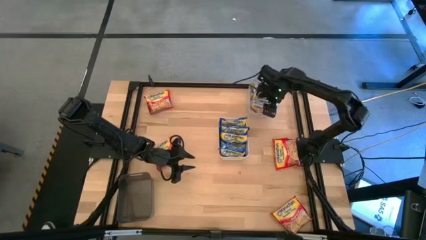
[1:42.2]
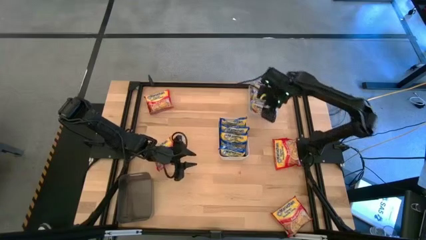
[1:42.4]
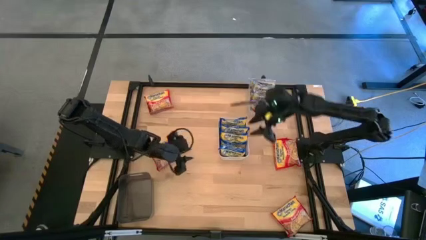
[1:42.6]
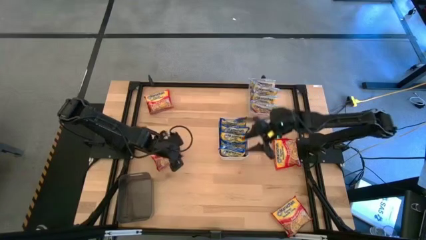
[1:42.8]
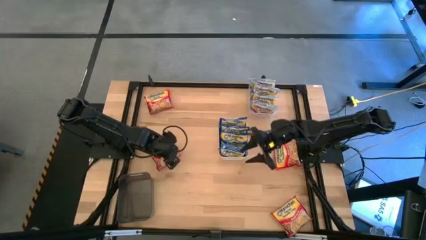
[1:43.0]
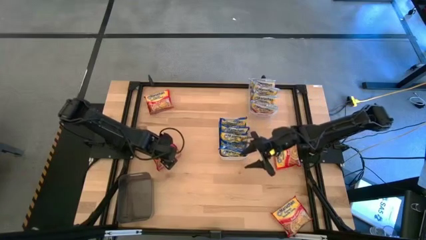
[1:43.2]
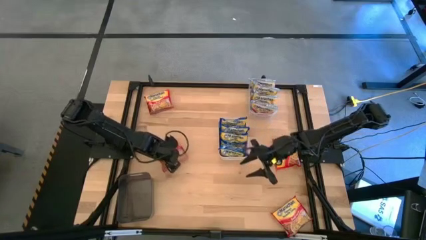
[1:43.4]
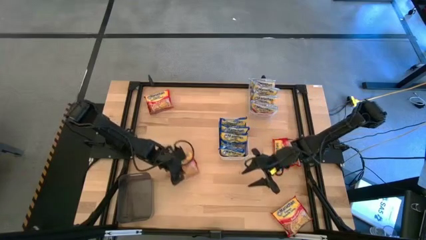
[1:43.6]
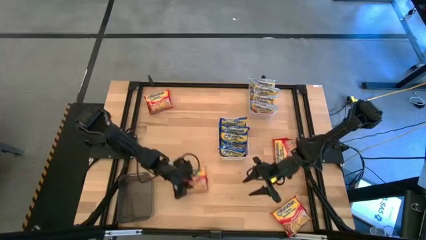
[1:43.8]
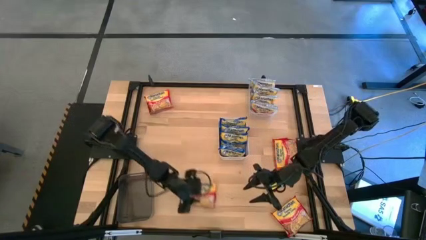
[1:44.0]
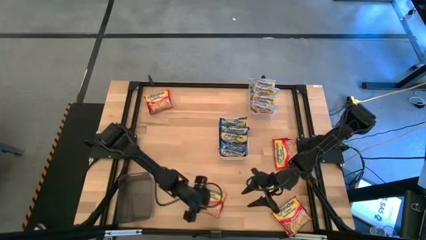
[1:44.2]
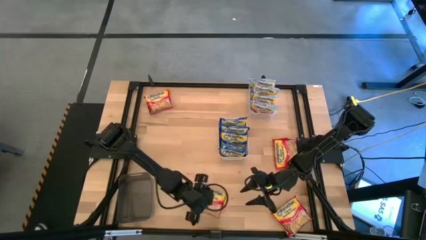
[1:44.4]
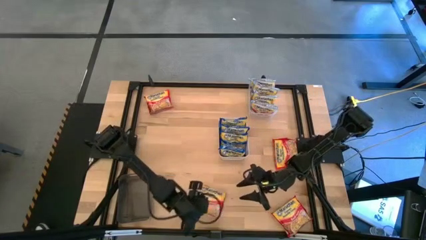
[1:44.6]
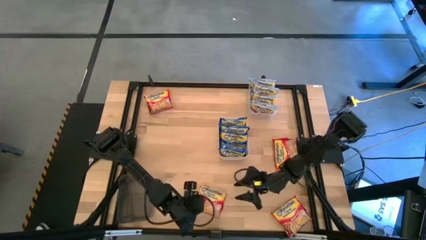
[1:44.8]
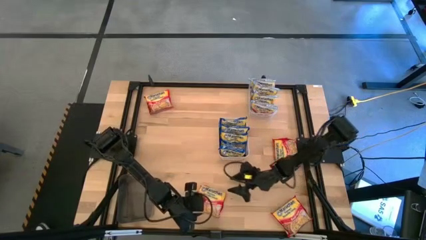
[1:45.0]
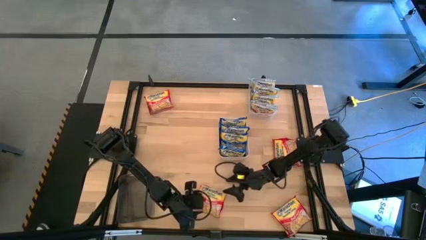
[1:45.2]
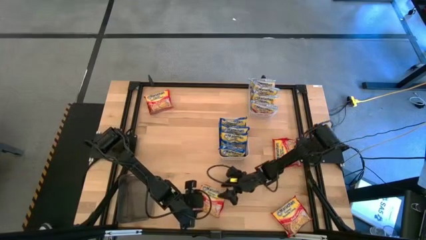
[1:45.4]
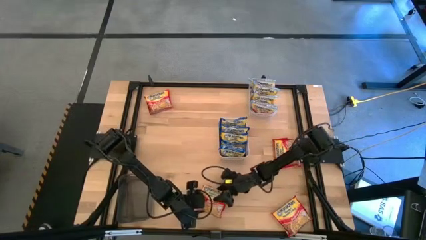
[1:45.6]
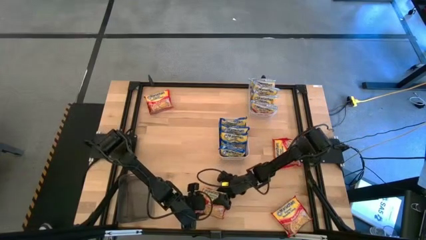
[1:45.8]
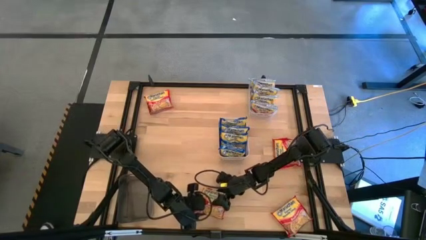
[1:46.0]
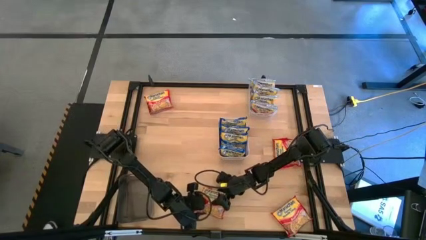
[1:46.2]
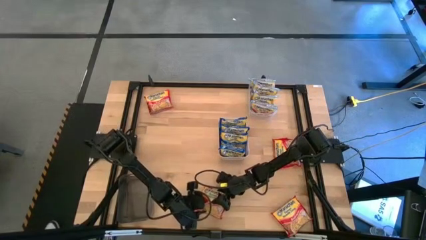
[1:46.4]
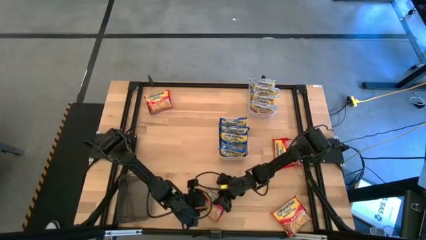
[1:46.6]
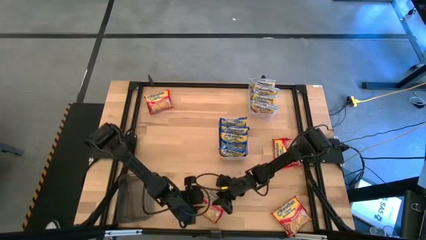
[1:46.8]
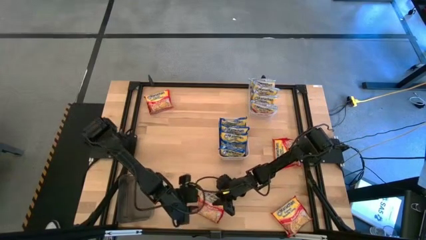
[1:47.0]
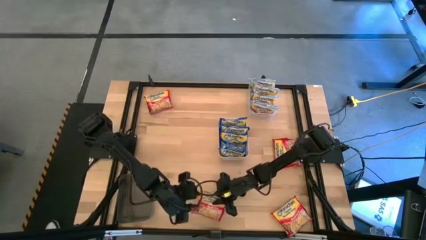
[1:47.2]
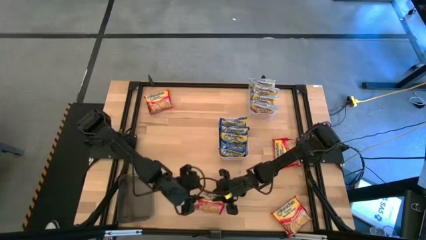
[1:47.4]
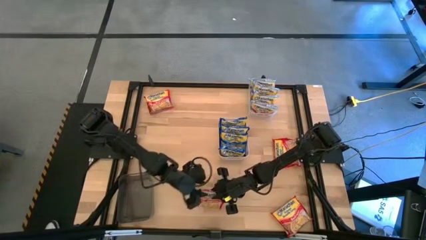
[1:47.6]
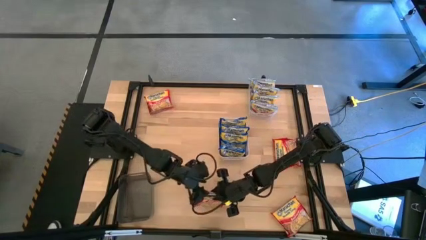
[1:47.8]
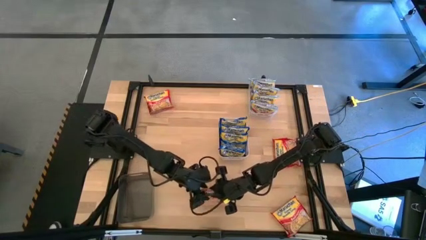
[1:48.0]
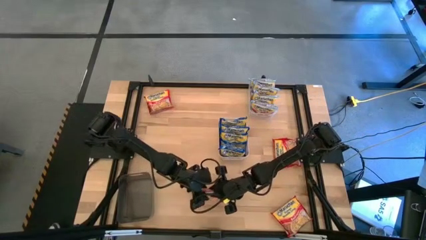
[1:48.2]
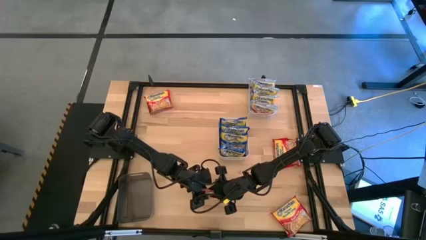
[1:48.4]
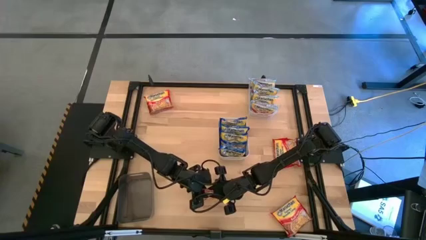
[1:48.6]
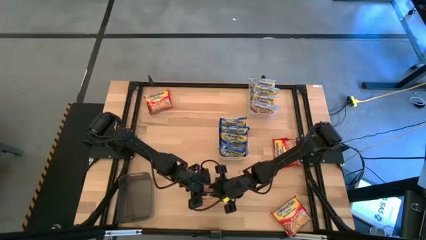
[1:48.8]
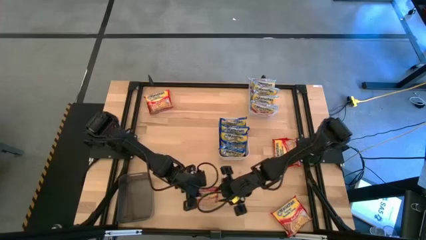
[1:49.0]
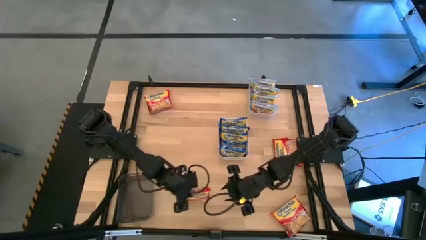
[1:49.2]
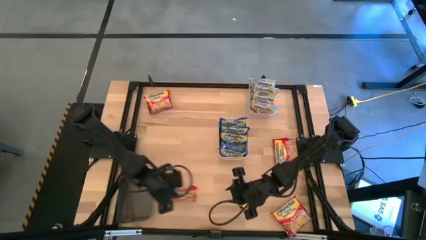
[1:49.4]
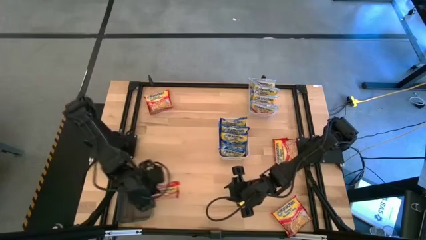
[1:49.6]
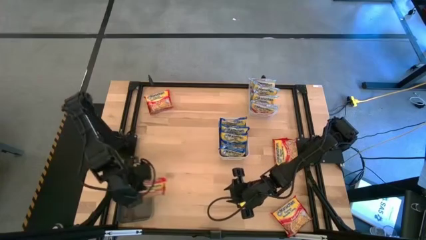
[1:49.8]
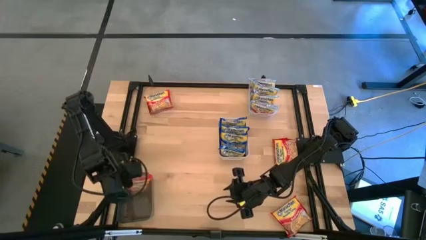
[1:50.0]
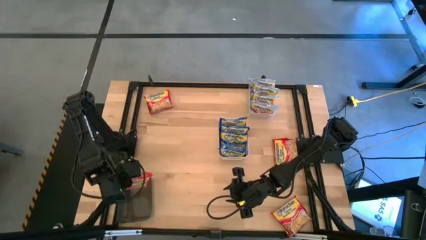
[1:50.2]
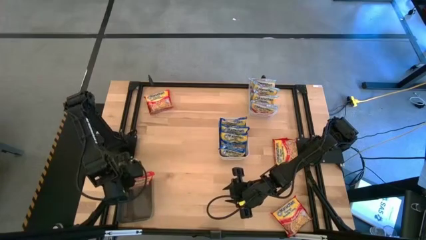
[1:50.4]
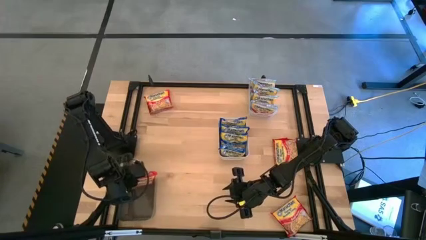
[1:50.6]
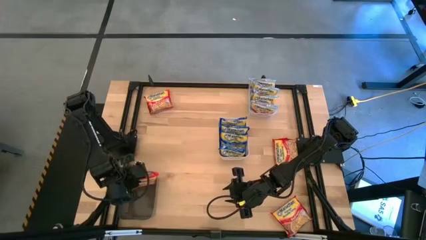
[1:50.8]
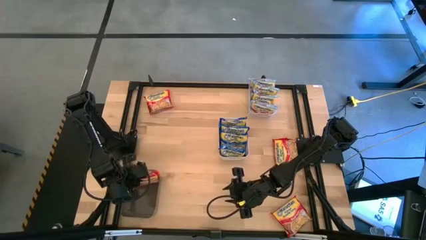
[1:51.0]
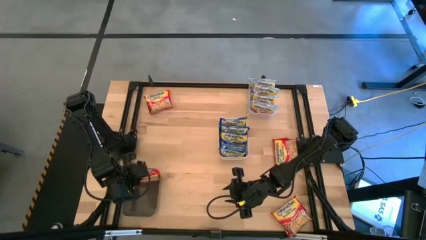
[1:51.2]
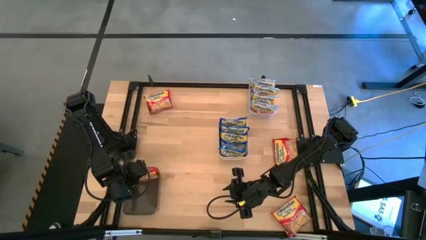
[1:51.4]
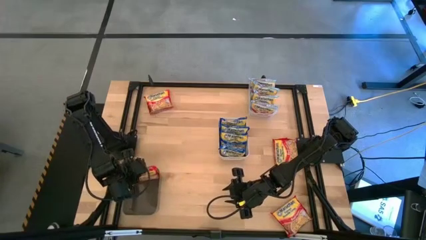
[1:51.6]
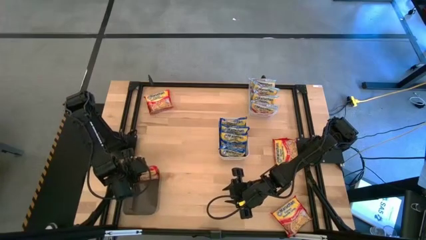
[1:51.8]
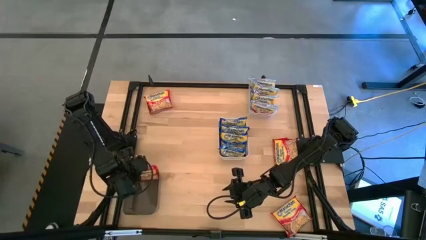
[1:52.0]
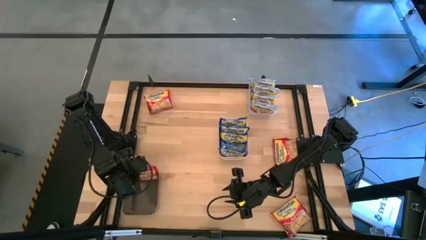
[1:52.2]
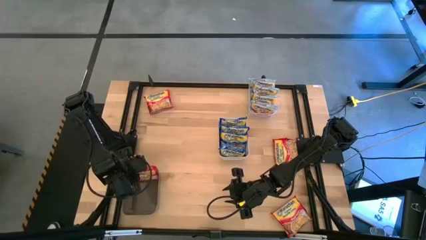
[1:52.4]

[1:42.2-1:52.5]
Task: Sort Maruchan noodles
Put the red noodle pack in the black bin

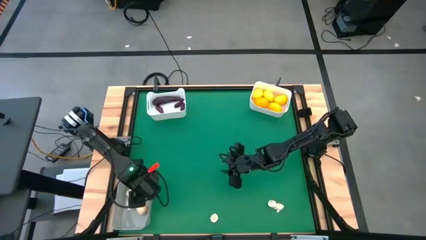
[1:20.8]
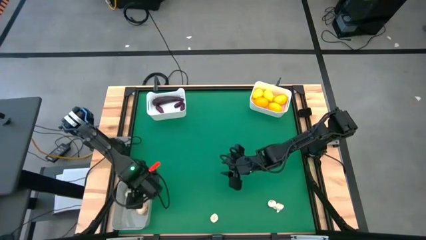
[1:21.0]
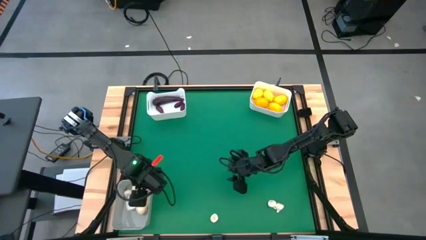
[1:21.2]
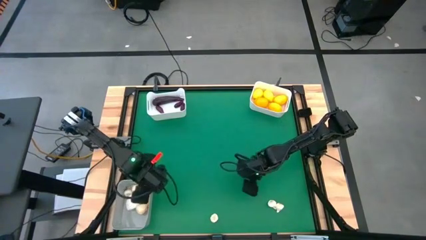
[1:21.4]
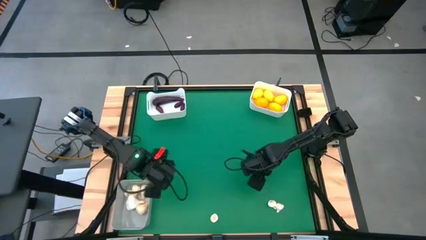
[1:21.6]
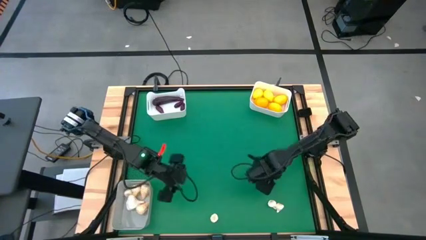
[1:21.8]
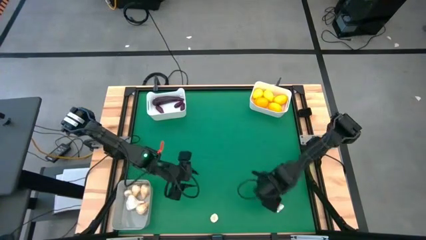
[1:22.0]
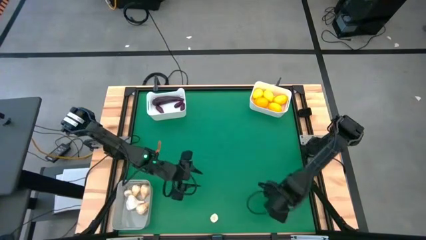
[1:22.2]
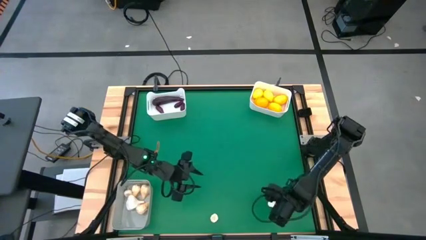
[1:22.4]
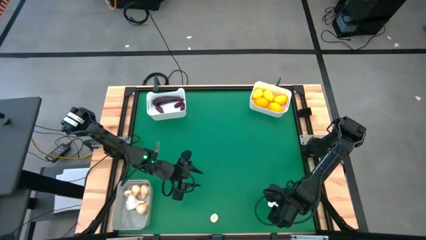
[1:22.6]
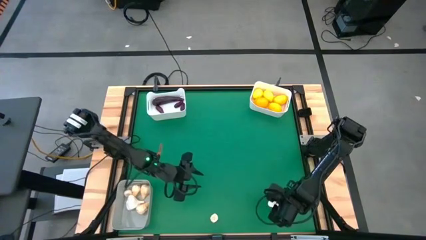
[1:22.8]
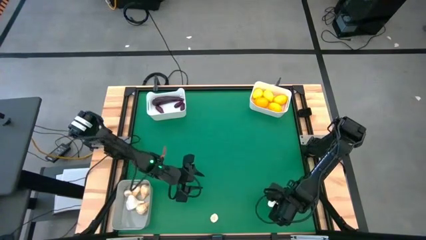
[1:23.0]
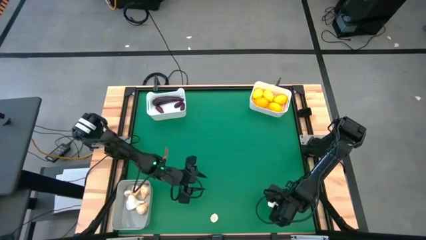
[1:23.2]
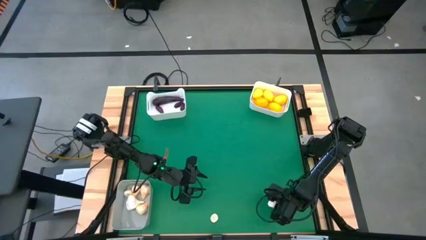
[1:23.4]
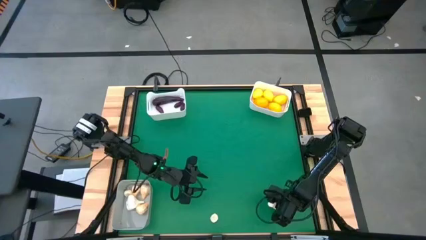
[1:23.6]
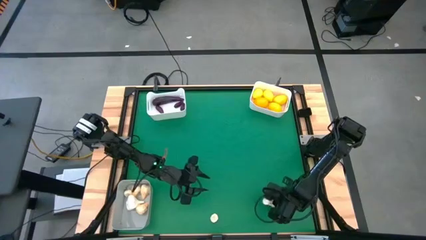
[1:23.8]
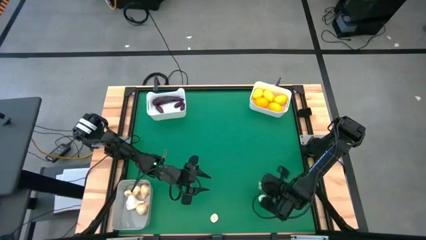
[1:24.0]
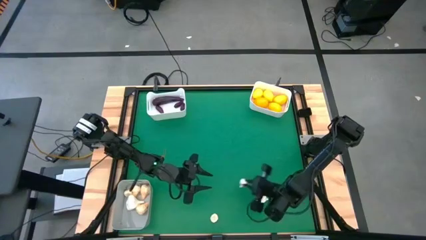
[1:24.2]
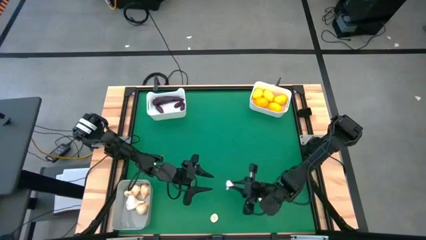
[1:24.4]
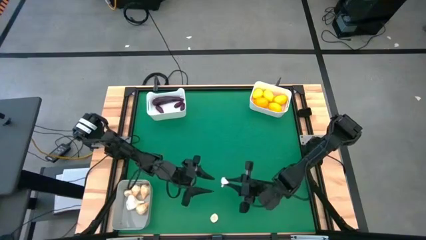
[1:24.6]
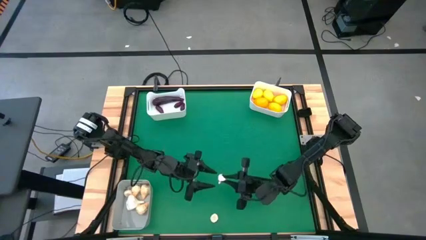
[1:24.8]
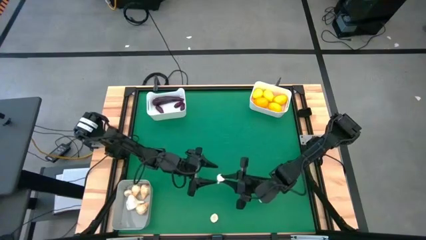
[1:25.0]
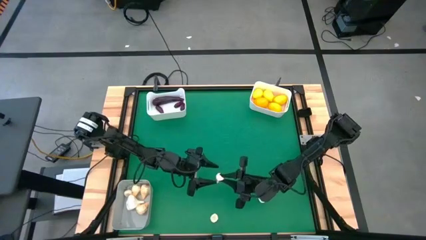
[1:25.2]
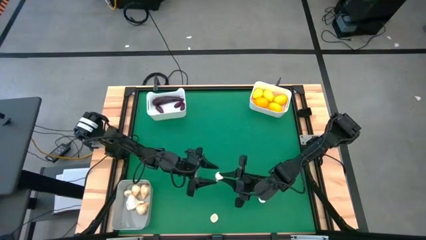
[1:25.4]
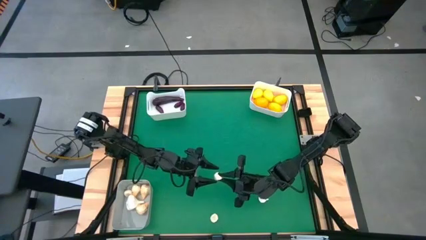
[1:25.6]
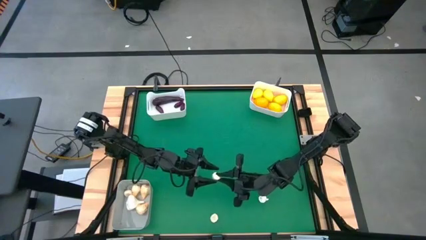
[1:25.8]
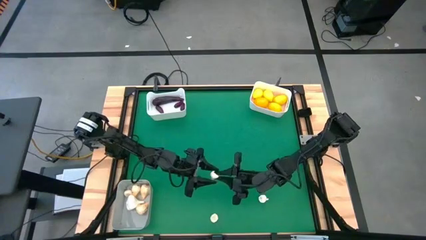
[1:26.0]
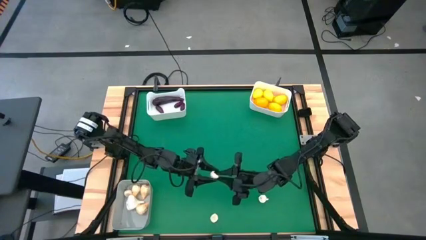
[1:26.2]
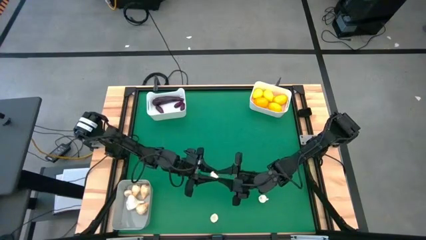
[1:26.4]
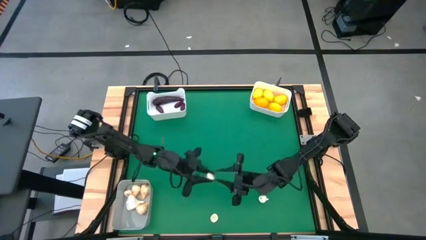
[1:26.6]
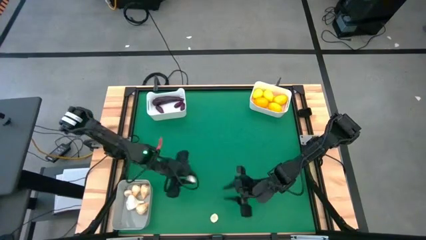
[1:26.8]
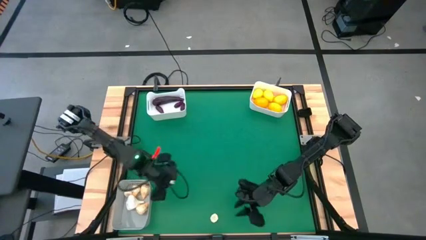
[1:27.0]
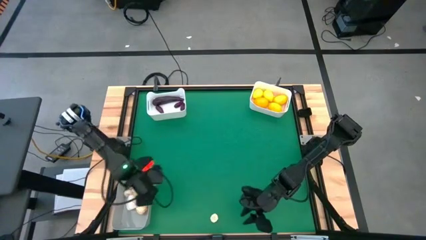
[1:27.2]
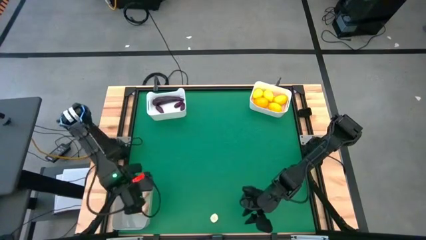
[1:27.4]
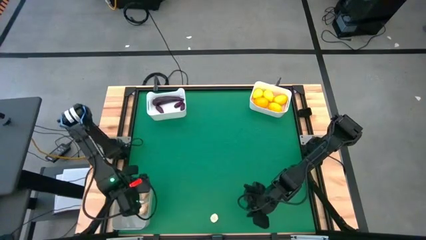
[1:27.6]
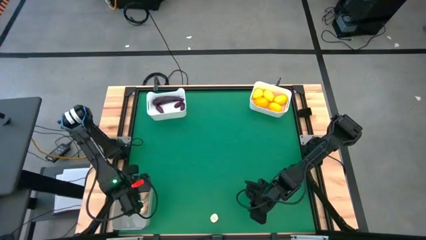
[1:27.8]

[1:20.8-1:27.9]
Task: Sort produce into baskets
Put the right white garlic into the gray bin
